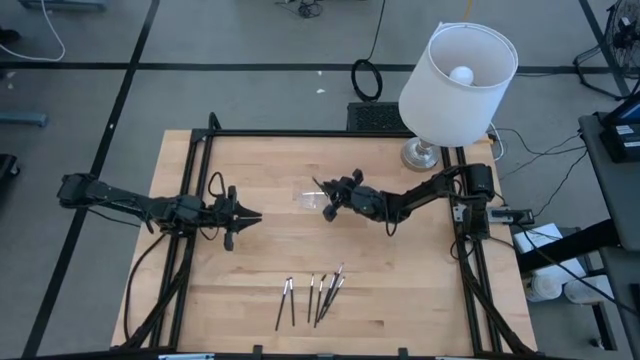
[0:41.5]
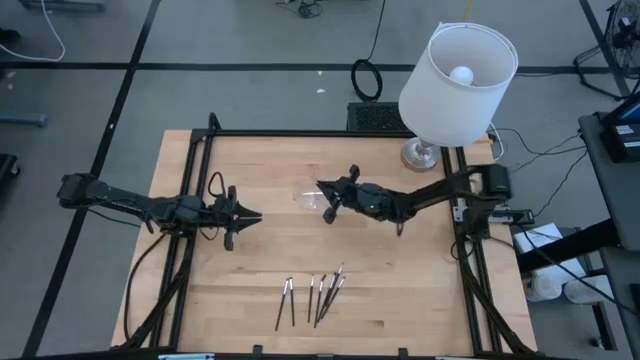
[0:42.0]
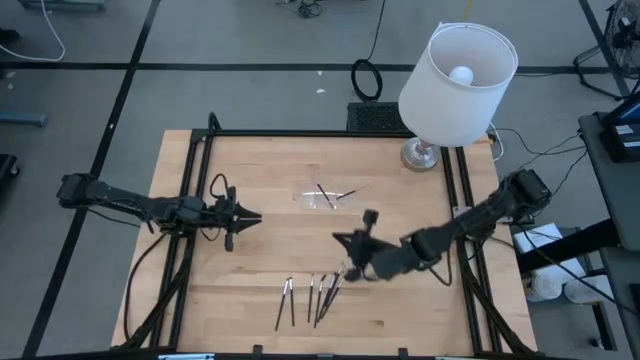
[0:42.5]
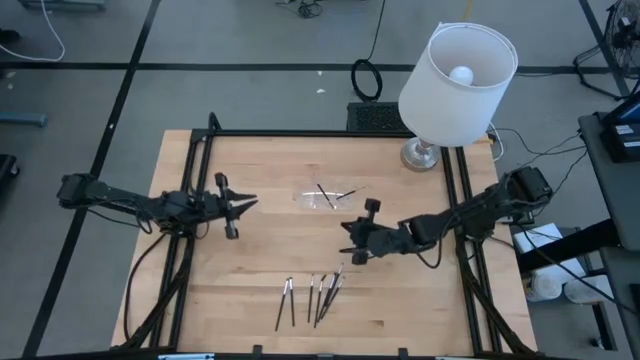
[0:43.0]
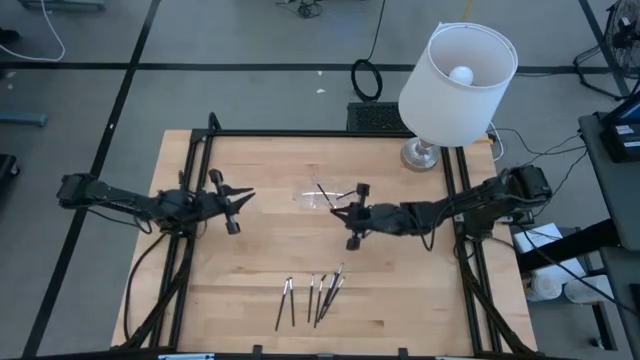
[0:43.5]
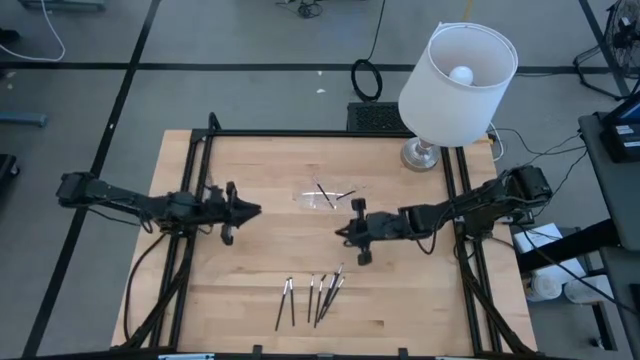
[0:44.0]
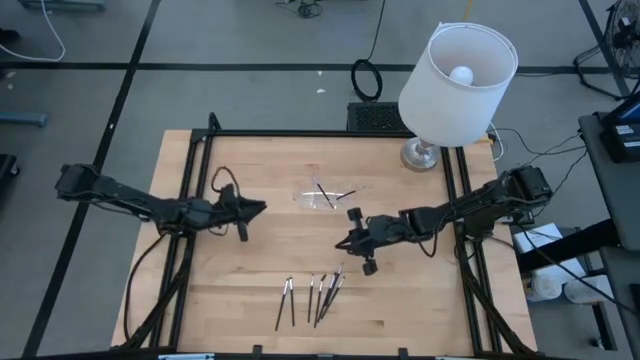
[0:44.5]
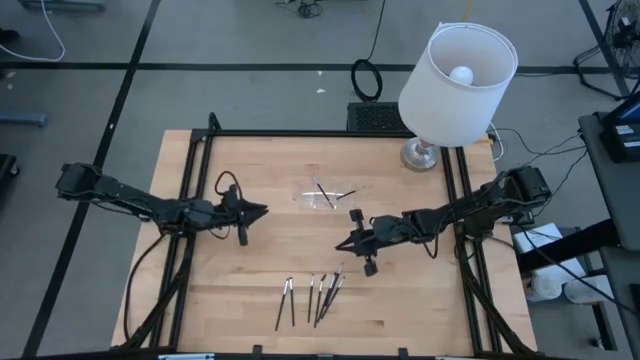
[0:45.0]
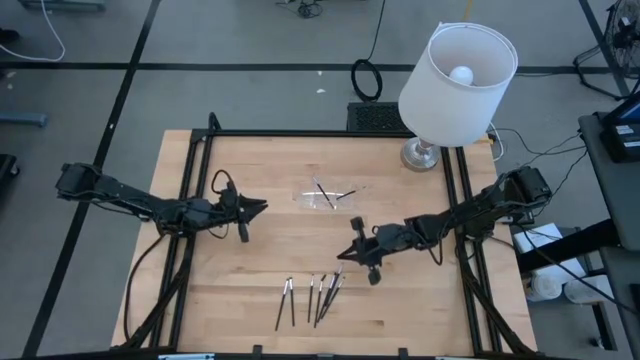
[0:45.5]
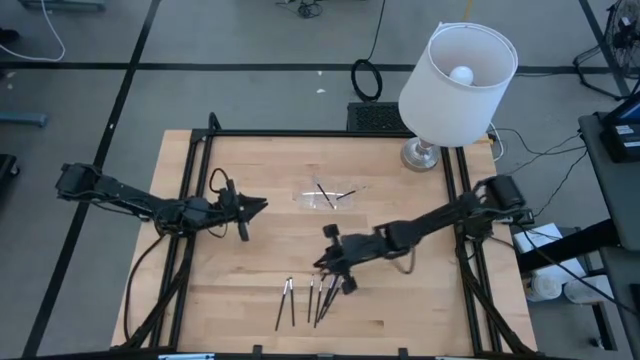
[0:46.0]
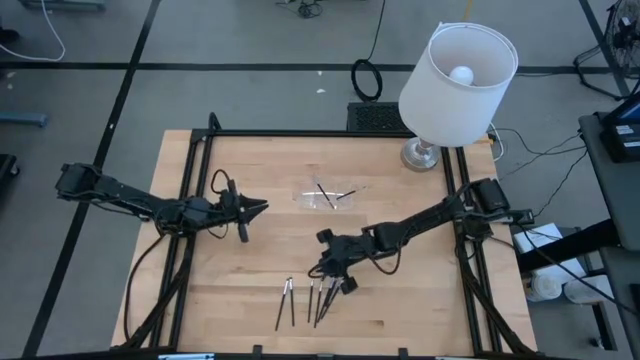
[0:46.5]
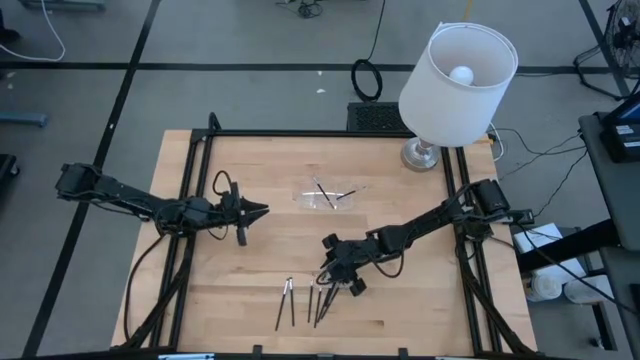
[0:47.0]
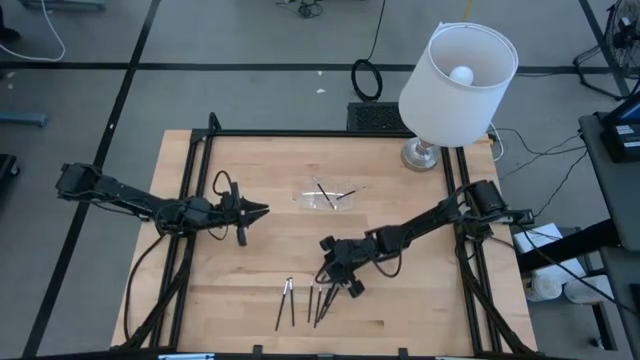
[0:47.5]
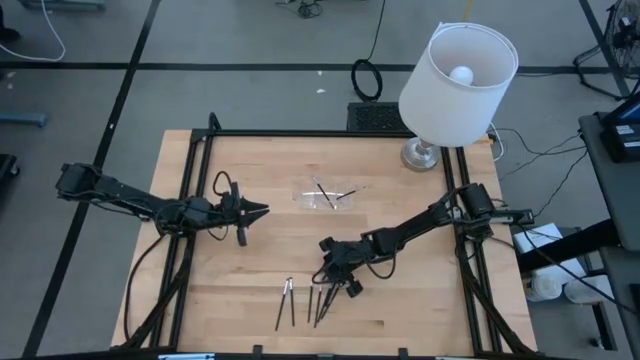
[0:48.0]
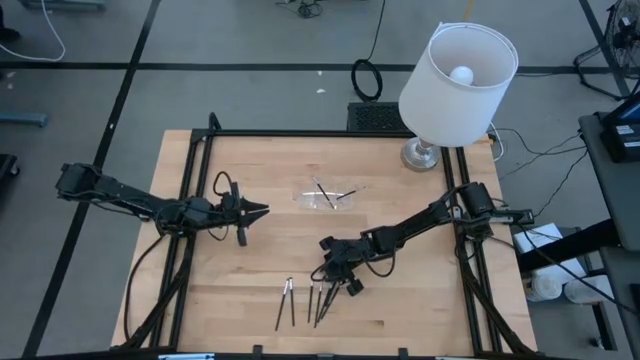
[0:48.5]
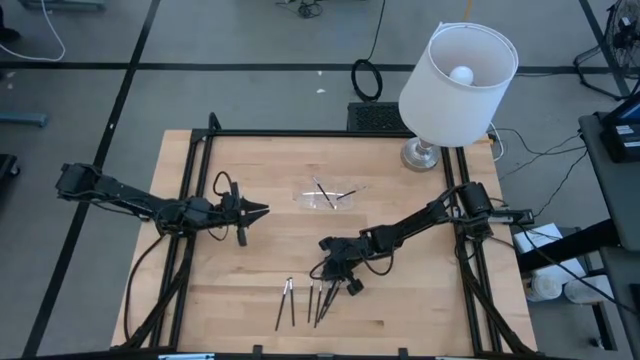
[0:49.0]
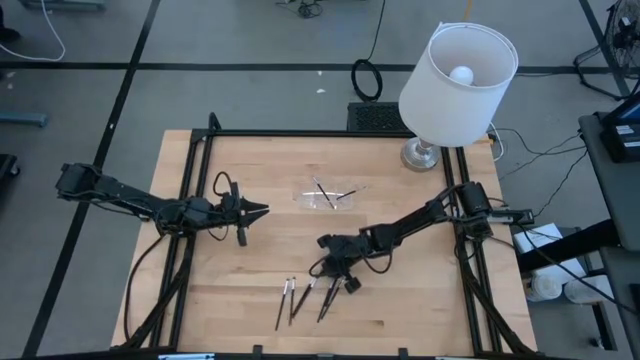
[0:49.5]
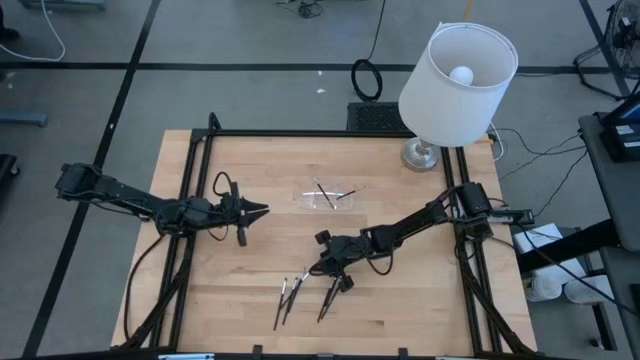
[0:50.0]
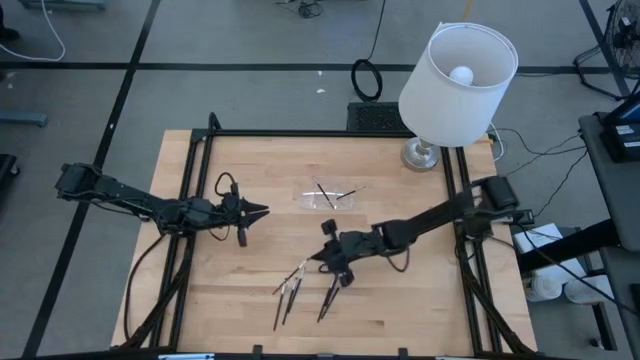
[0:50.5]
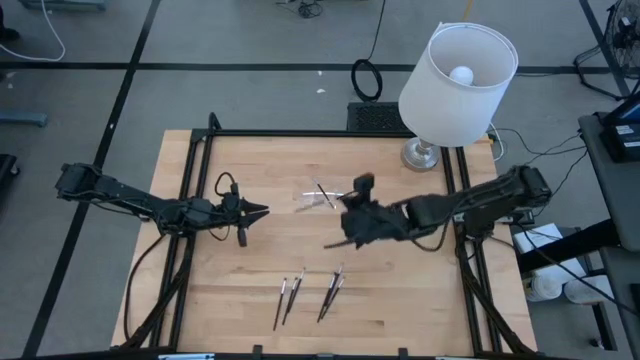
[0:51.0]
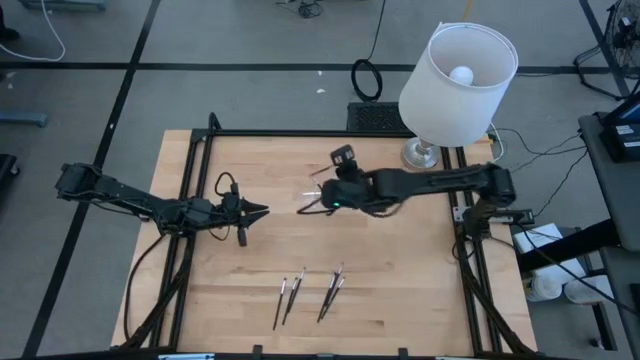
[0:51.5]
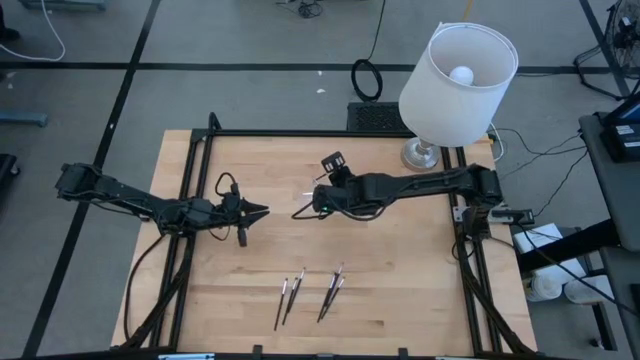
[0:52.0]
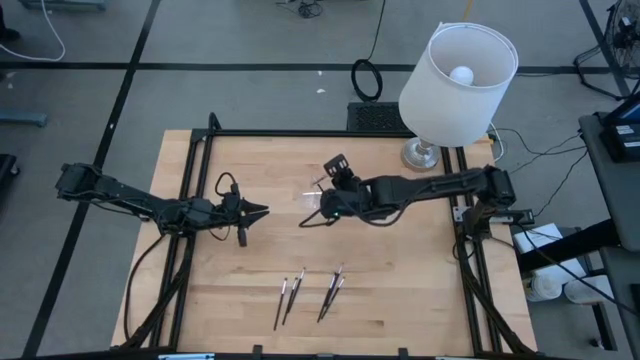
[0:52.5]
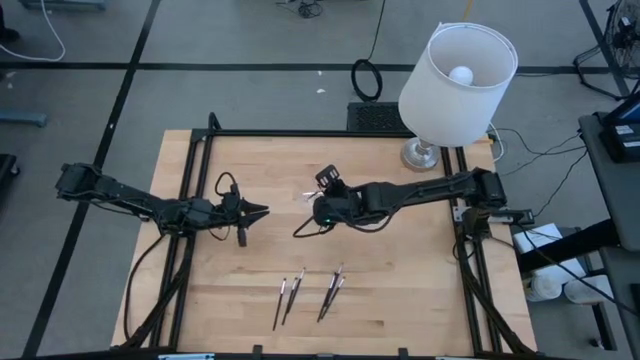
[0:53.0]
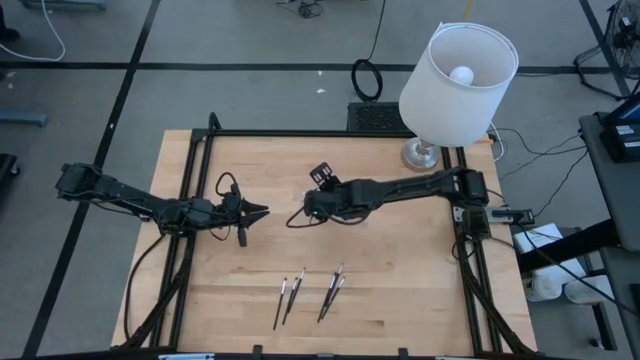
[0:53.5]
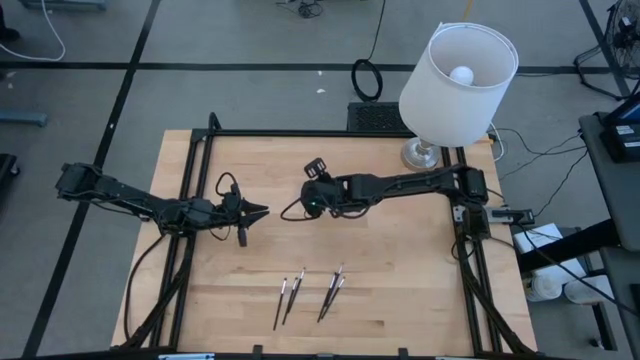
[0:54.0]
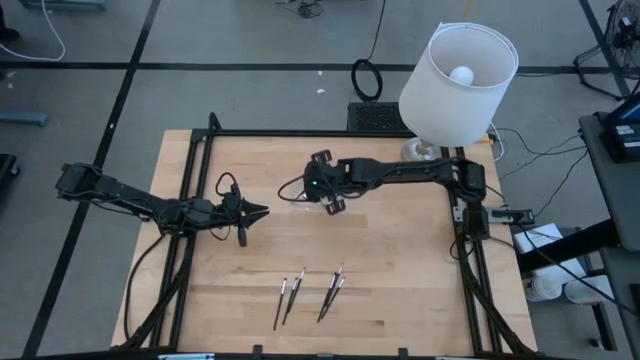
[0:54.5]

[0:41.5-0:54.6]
Task: Put items in baskets/containers
Put the black brow brush into the transparent organizer
